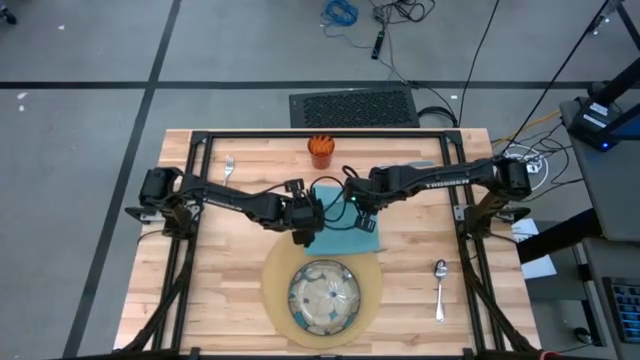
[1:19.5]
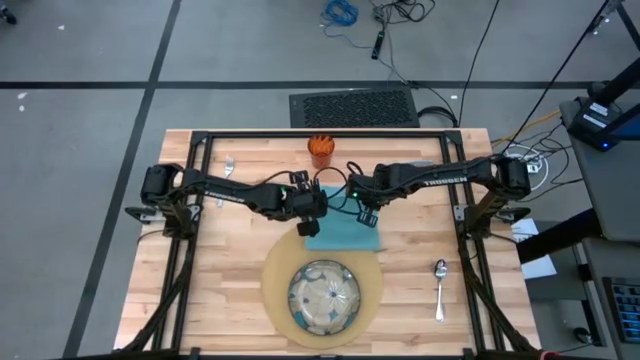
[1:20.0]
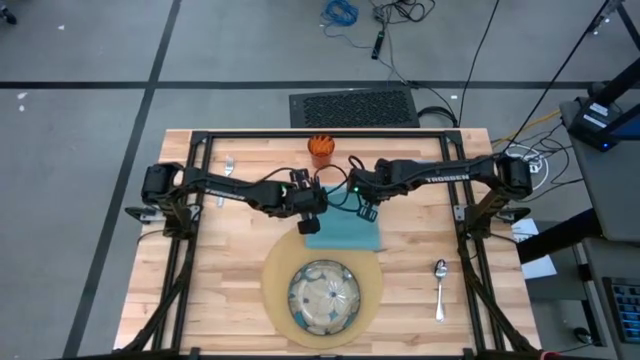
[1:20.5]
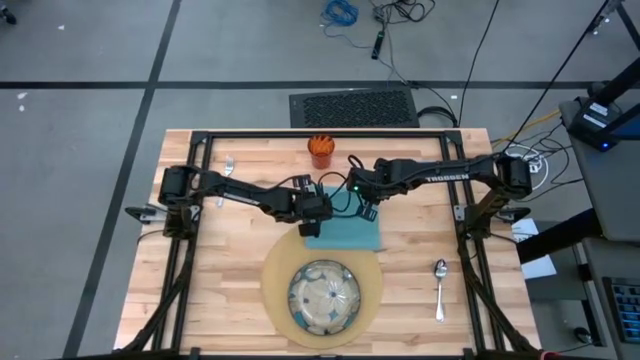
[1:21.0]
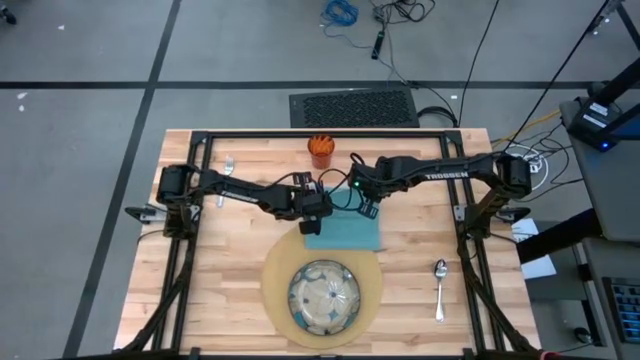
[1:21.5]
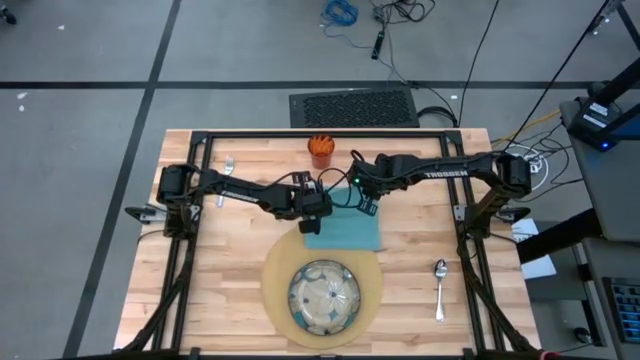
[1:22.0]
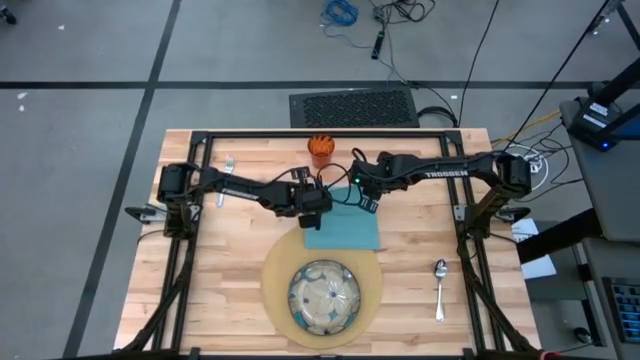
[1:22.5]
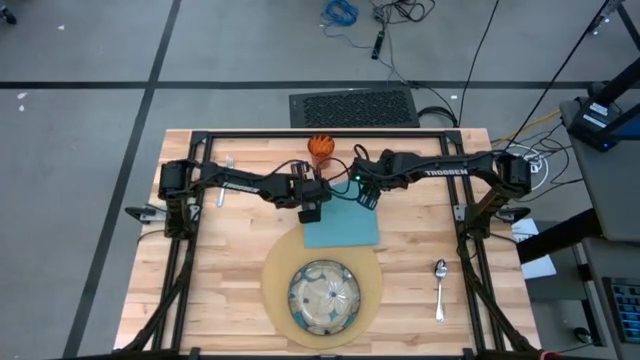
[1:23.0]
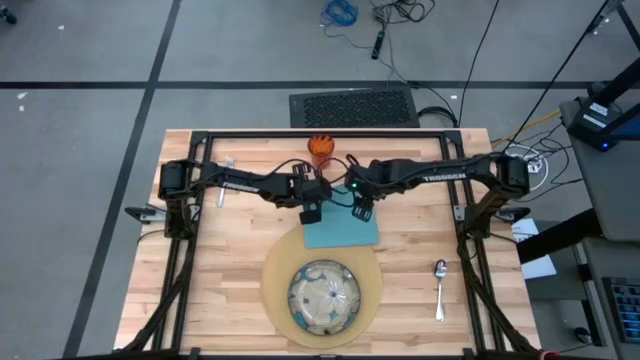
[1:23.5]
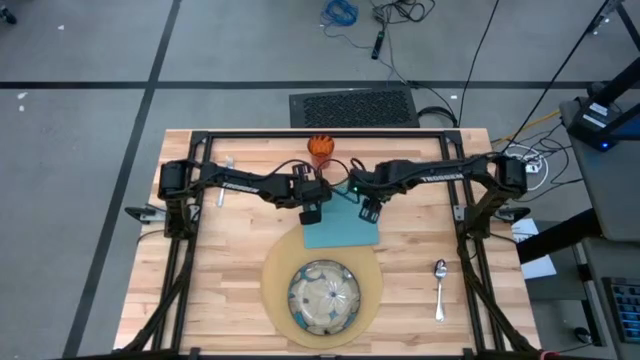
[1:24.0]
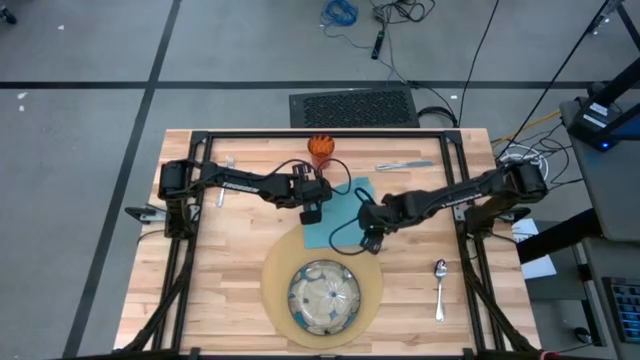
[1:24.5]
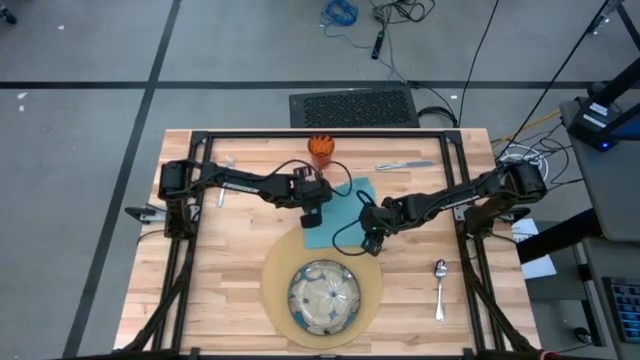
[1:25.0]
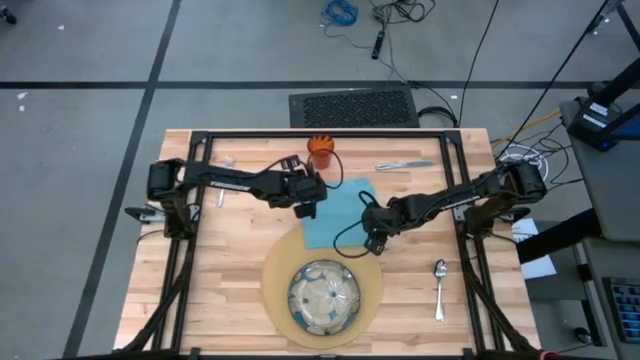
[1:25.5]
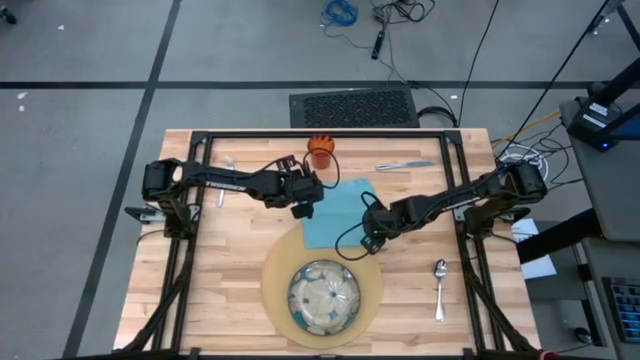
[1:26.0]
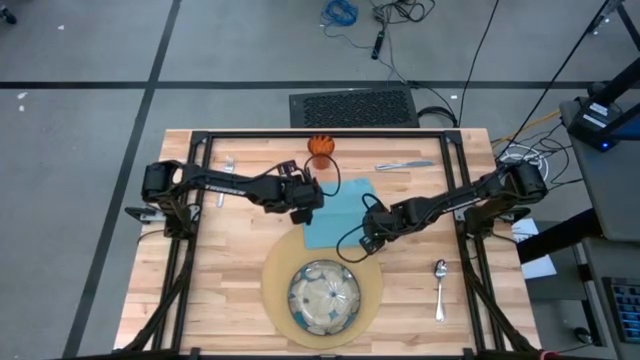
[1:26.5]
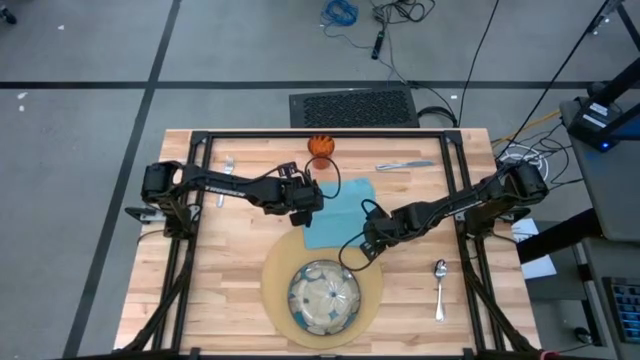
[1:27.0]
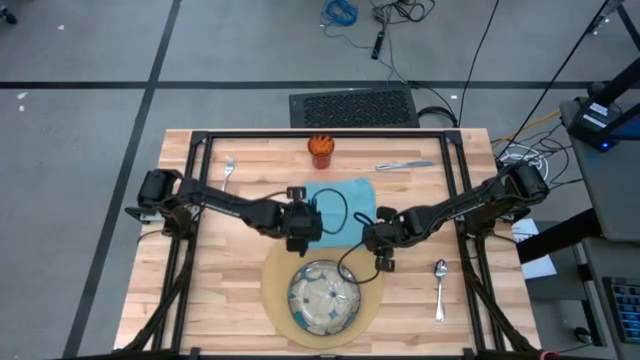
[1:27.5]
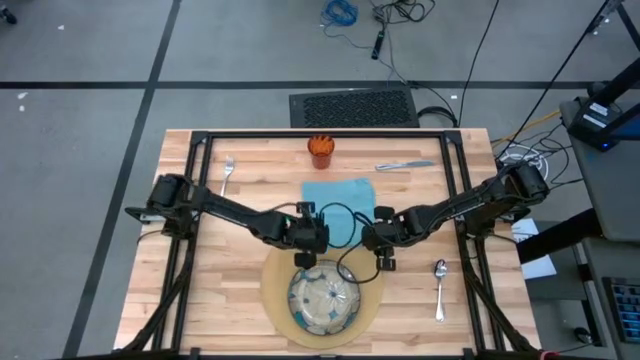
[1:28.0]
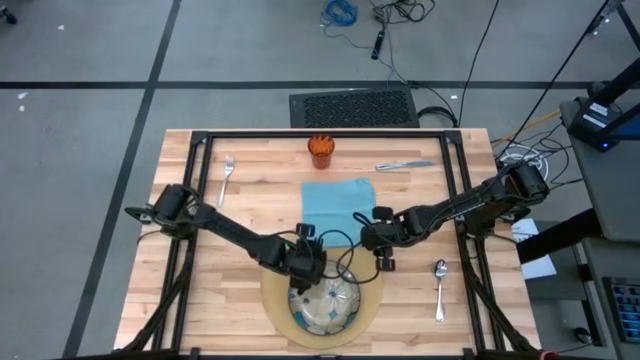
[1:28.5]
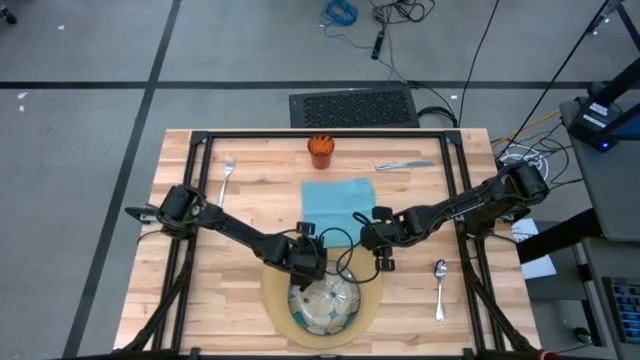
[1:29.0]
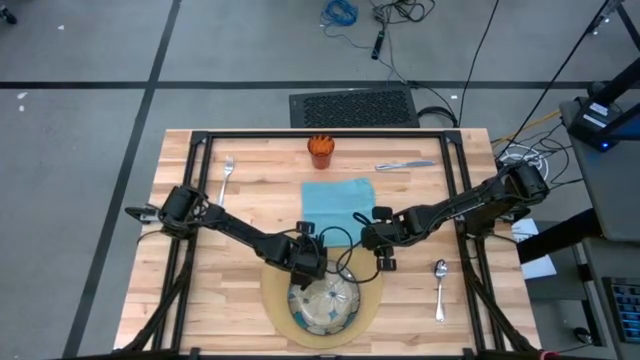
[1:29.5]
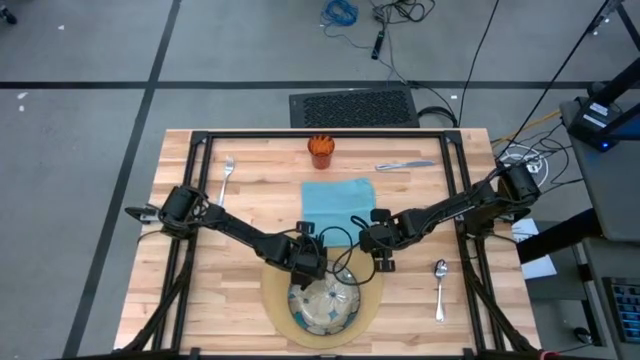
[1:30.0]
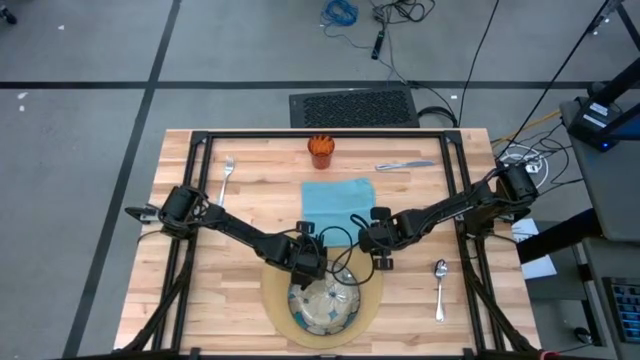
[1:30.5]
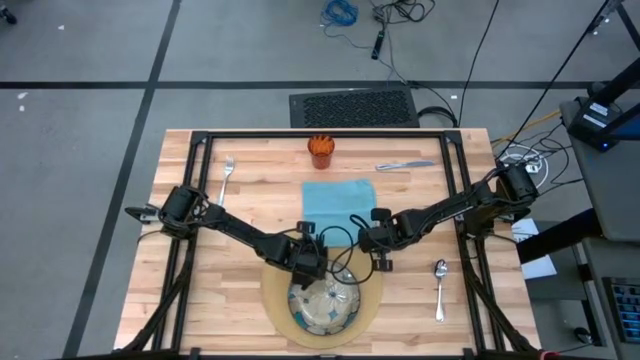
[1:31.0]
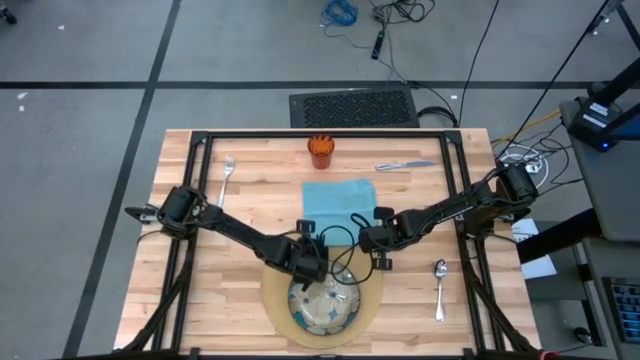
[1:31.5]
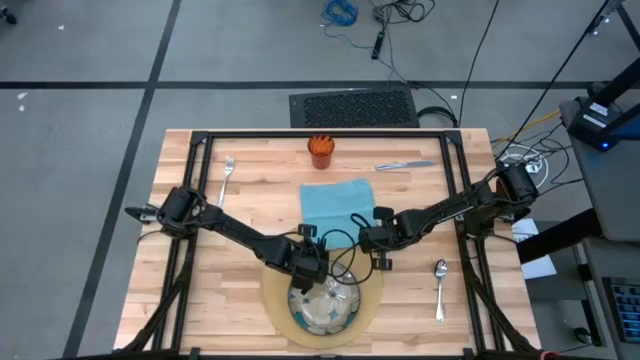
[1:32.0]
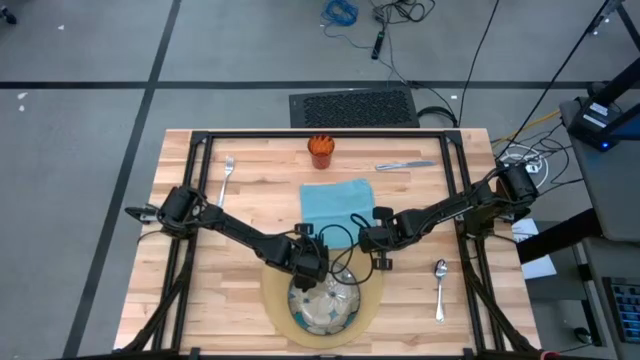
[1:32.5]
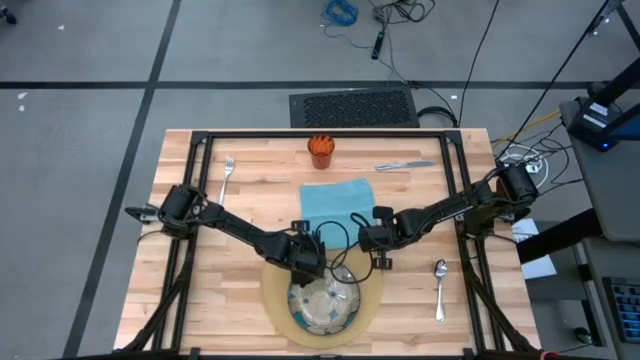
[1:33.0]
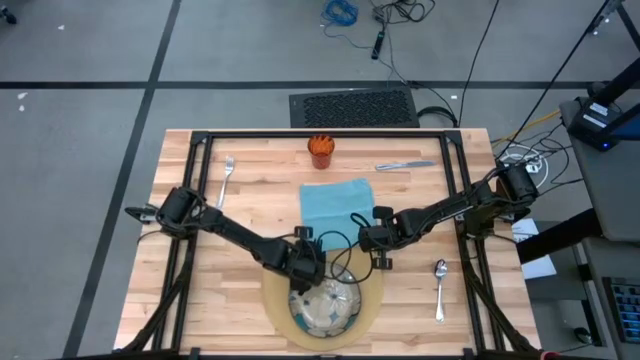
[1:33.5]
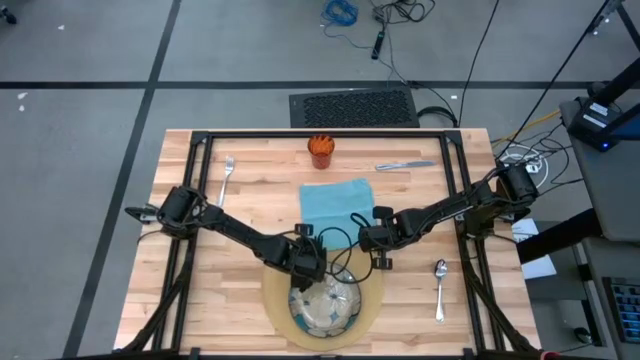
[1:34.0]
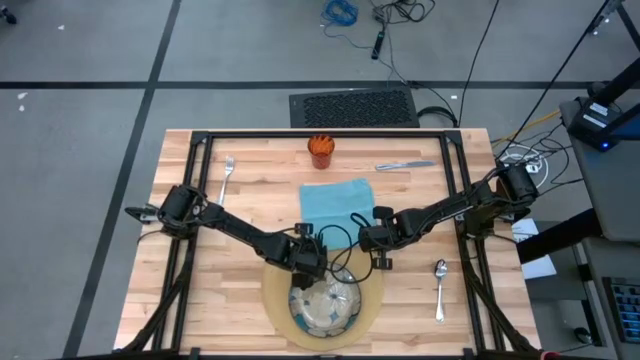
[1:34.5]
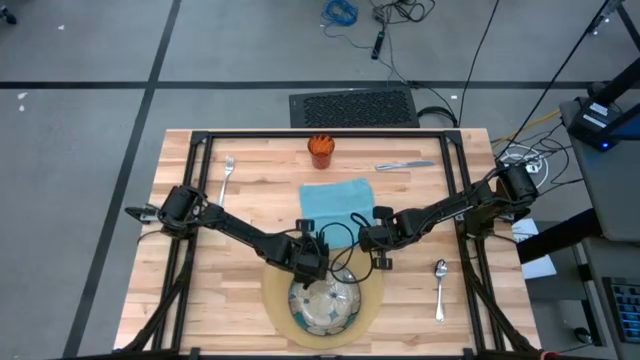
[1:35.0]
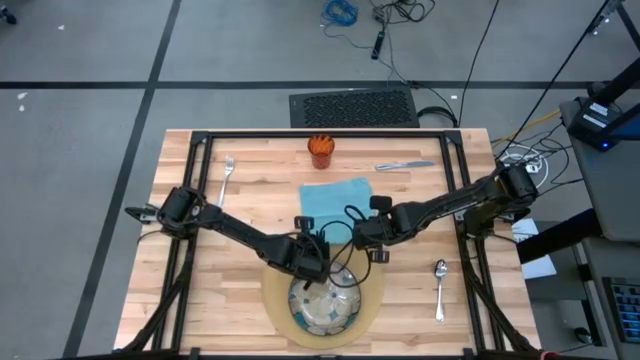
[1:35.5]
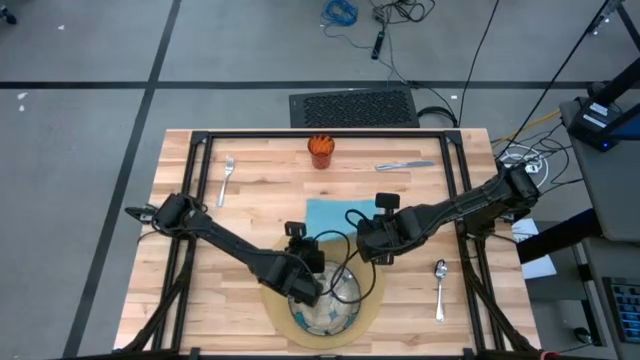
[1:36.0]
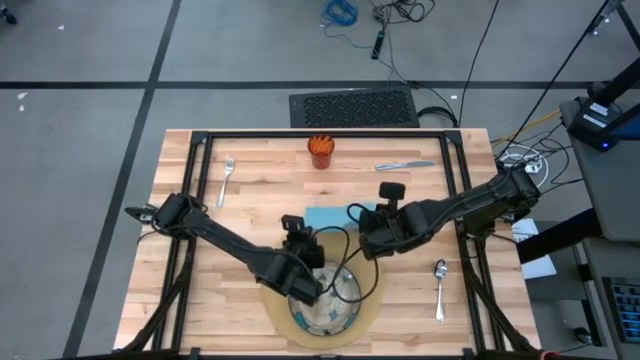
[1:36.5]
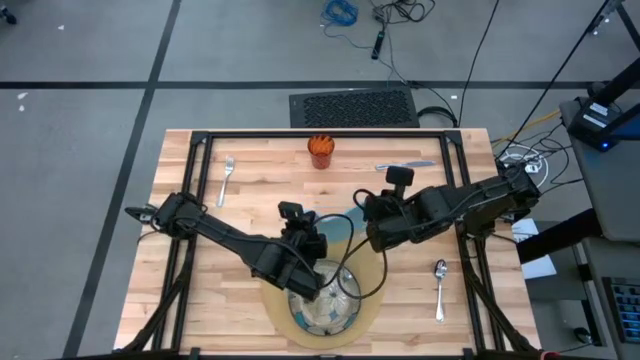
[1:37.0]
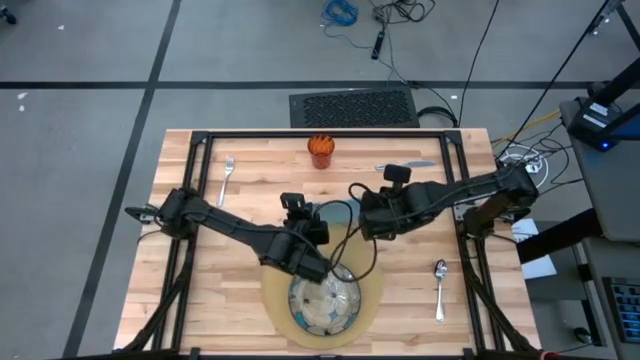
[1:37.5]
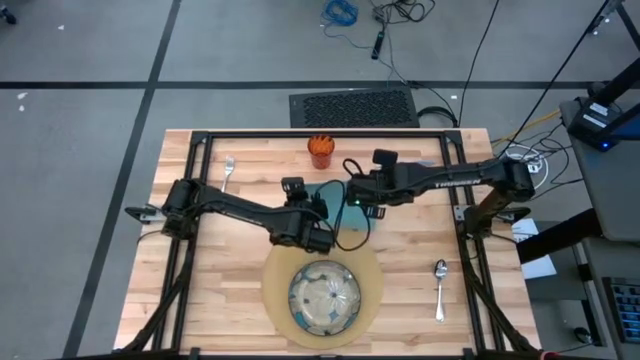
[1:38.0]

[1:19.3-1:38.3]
Task: Set table place
Fold the blue table napkin
